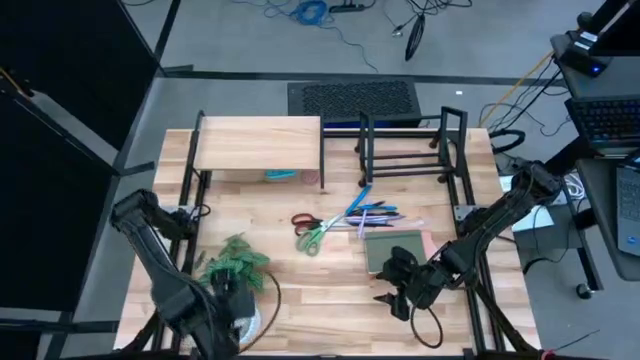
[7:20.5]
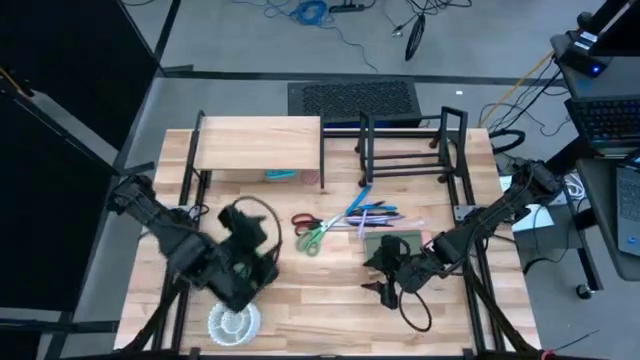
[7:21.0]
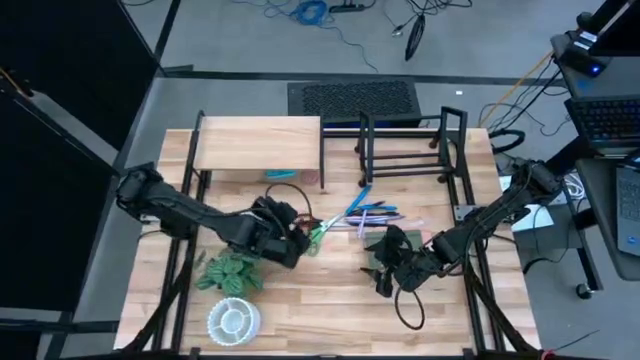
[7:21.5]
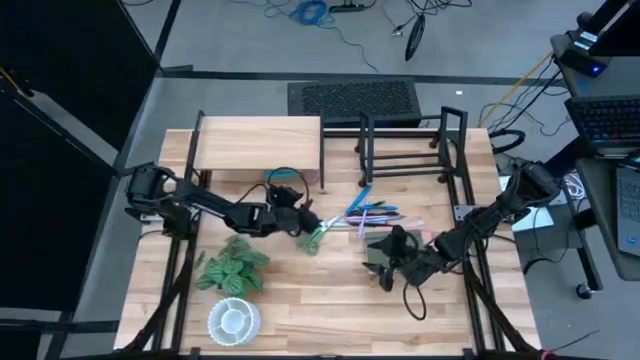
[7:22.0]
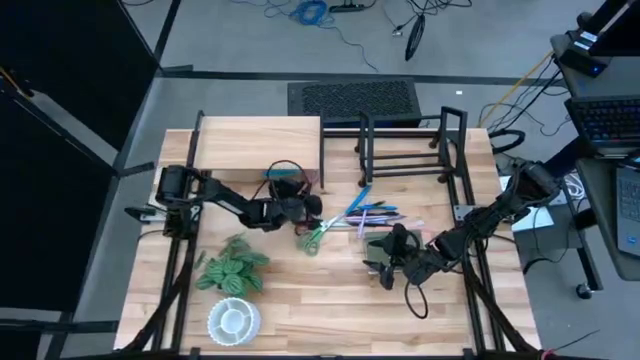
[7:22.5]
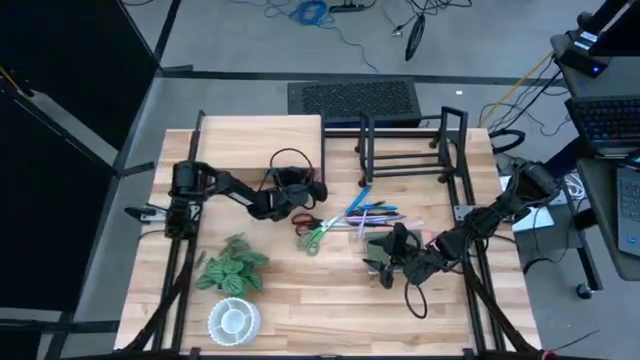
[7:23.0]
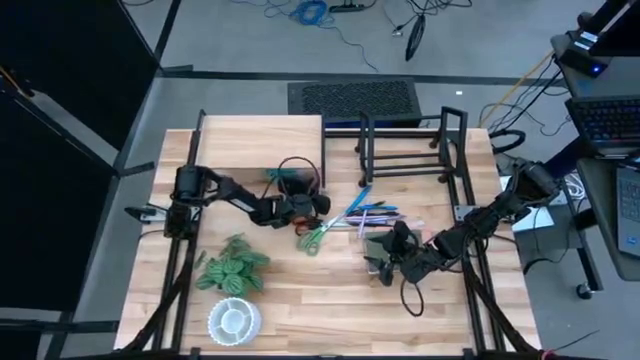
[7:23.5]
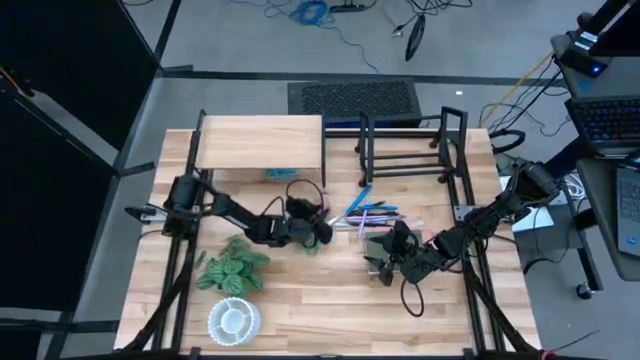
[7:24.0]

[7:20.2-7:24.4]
Task: Stock shelves
Remove the red scented candle from under the shelf

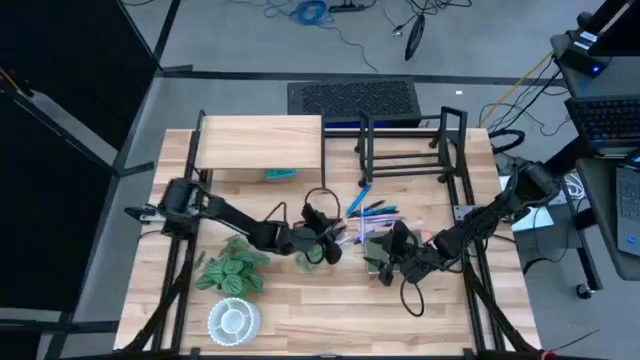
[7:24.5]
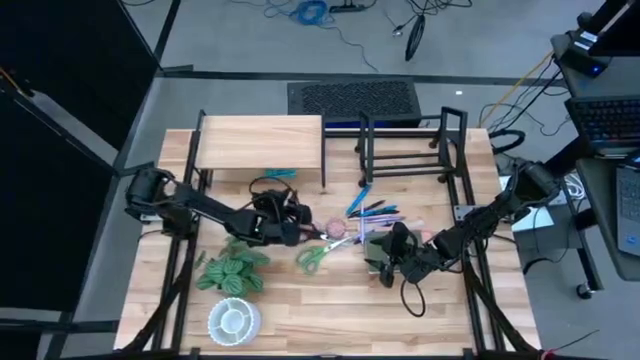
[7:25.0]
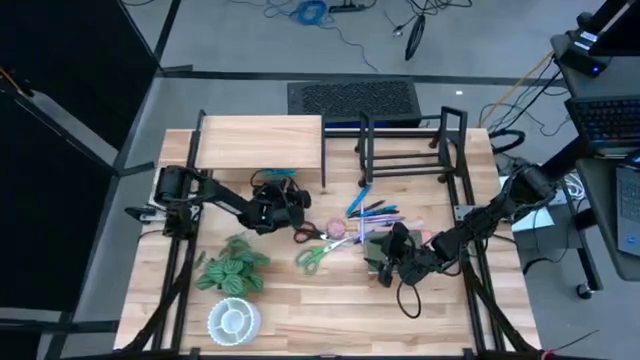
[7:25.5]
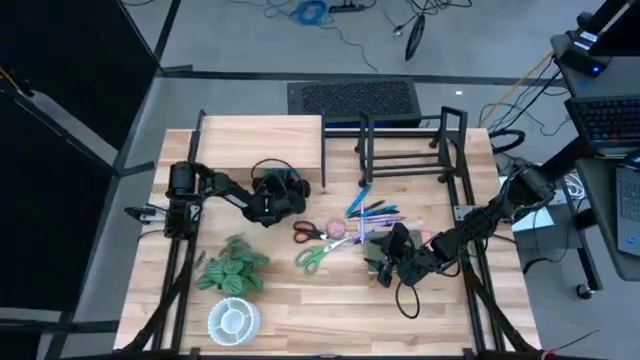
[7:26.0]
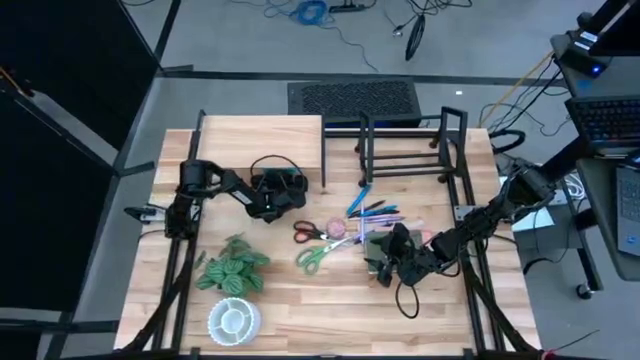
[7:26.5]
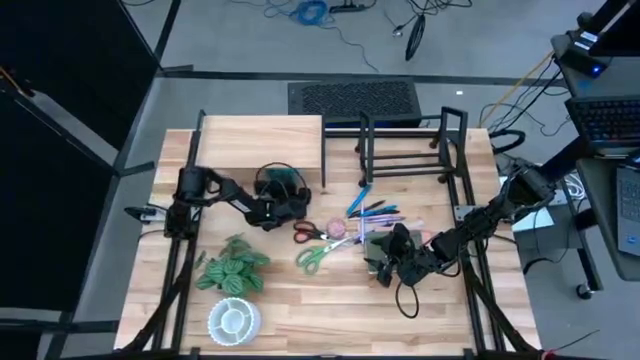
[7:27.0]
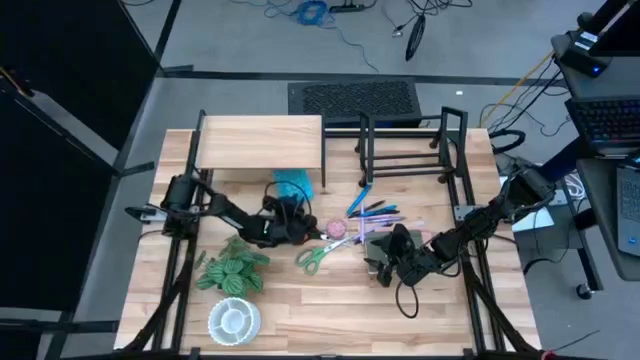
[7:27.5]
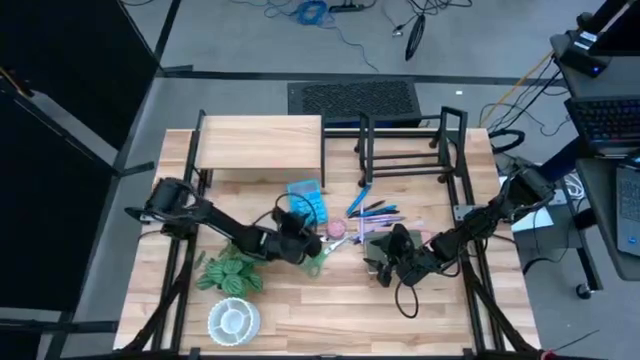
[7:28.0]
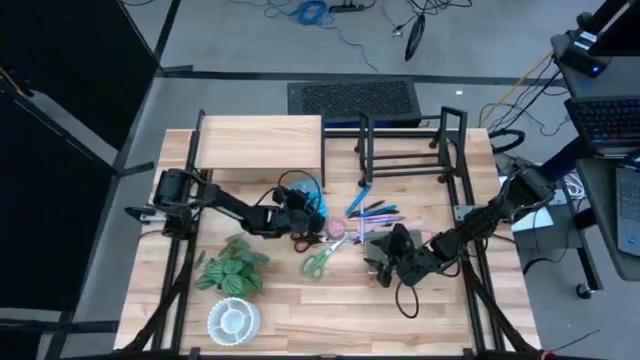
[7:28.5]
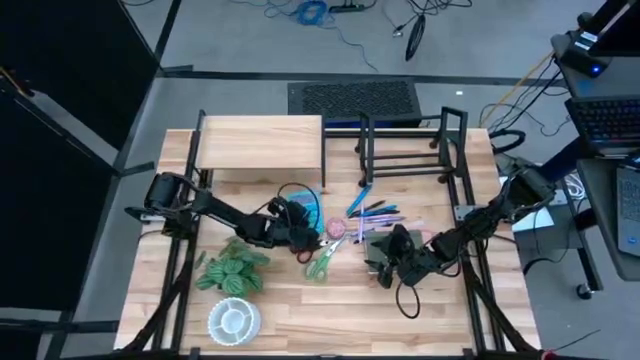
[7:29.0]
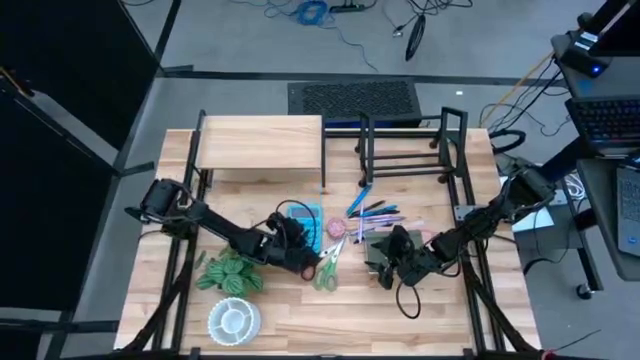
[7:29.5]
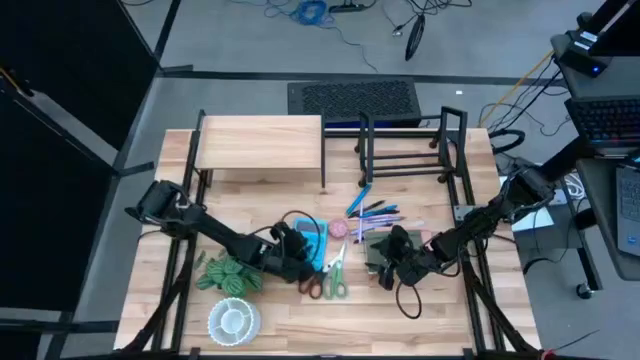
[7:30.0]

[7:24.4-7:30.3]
Remove the calculator from under the shelf

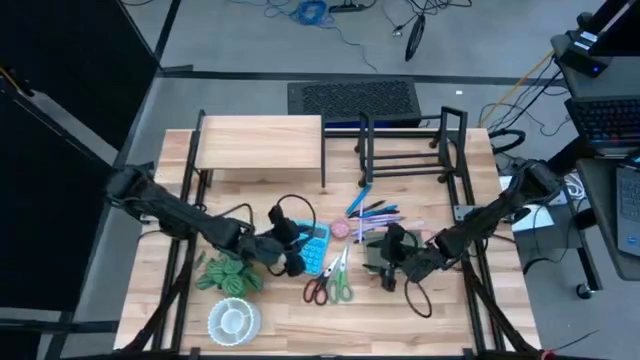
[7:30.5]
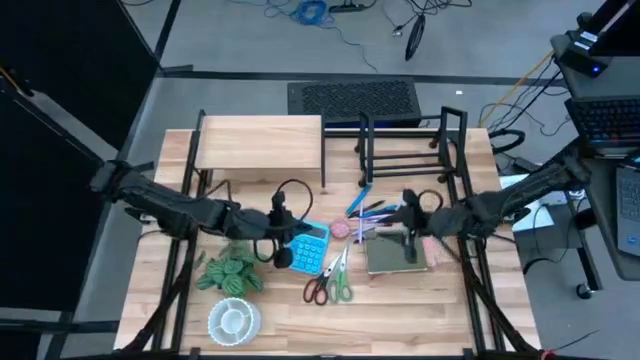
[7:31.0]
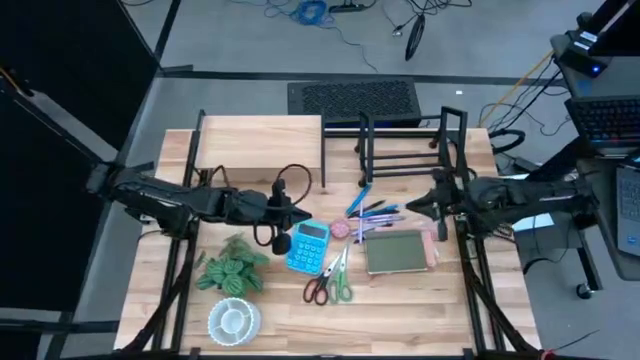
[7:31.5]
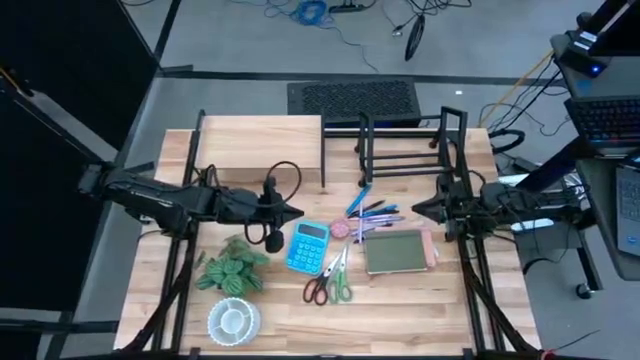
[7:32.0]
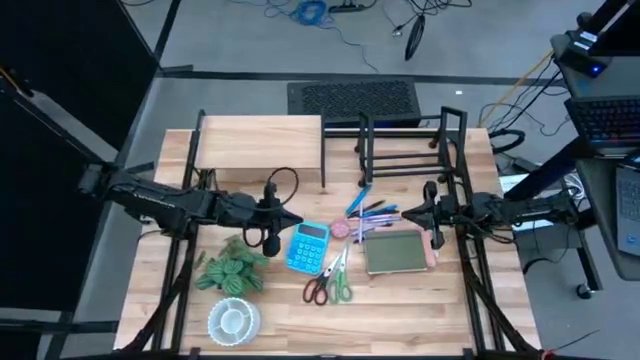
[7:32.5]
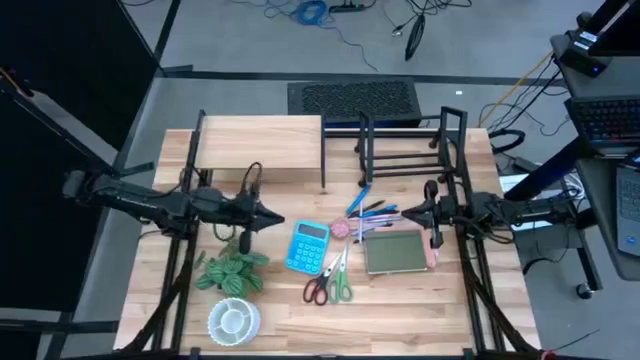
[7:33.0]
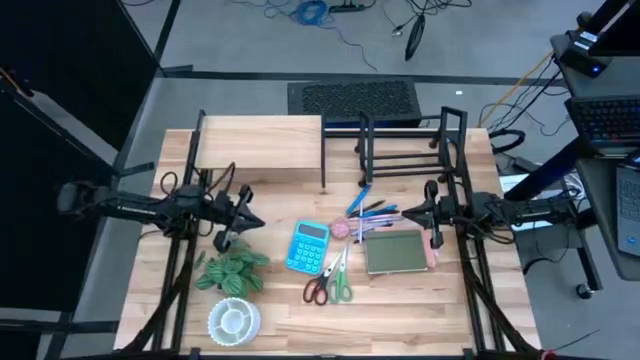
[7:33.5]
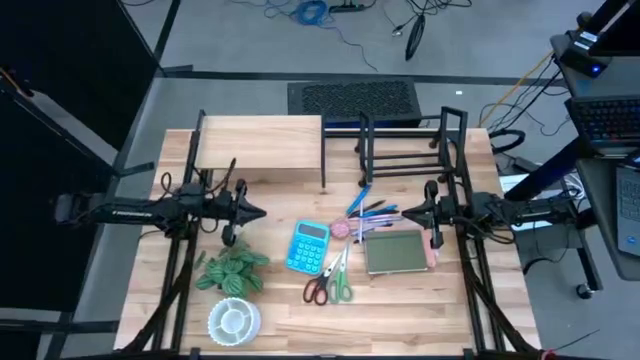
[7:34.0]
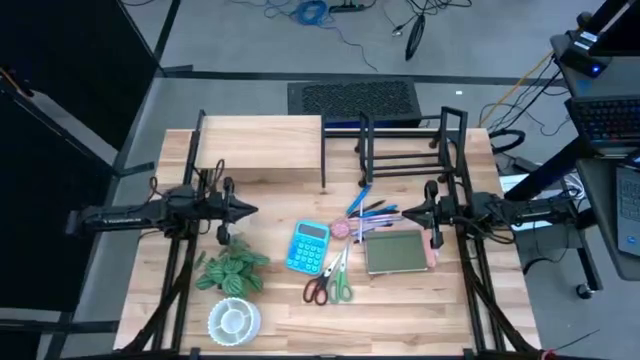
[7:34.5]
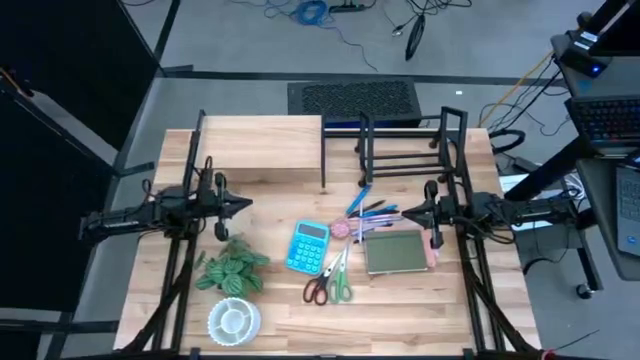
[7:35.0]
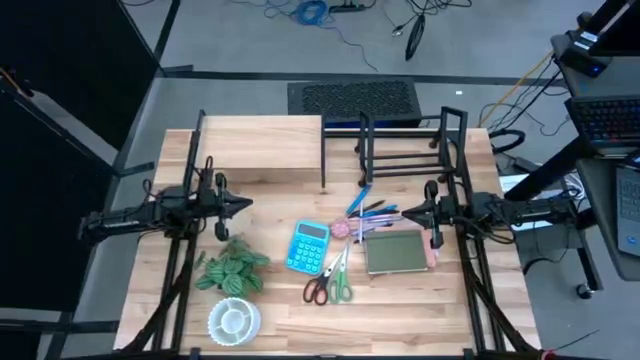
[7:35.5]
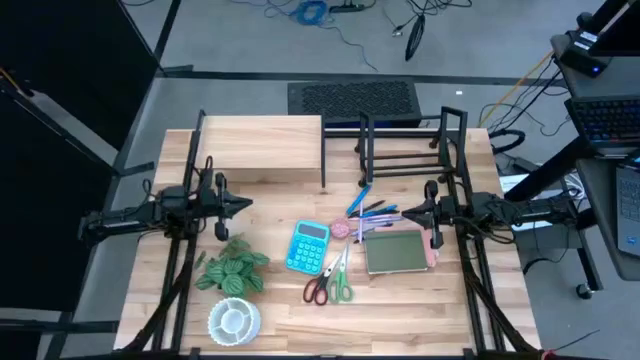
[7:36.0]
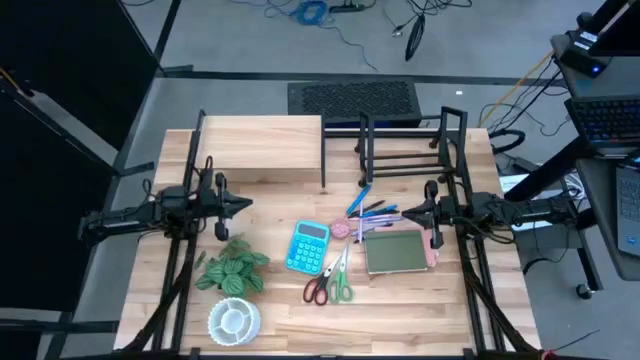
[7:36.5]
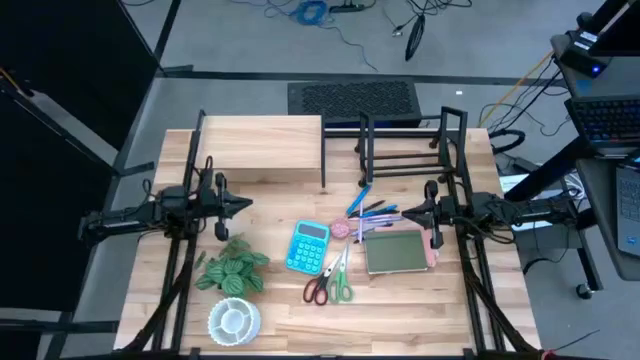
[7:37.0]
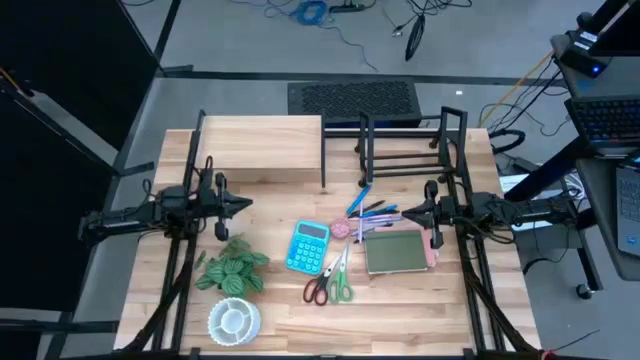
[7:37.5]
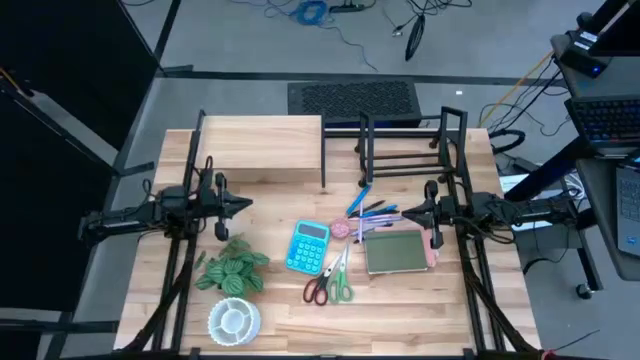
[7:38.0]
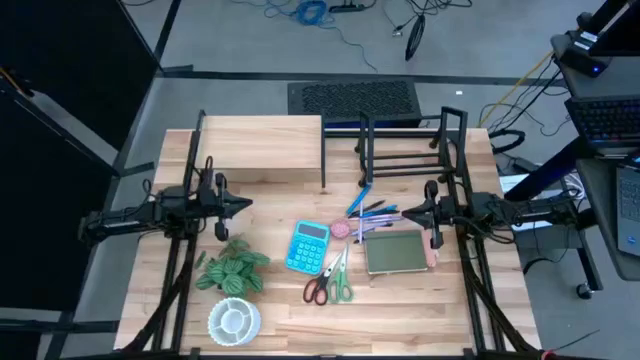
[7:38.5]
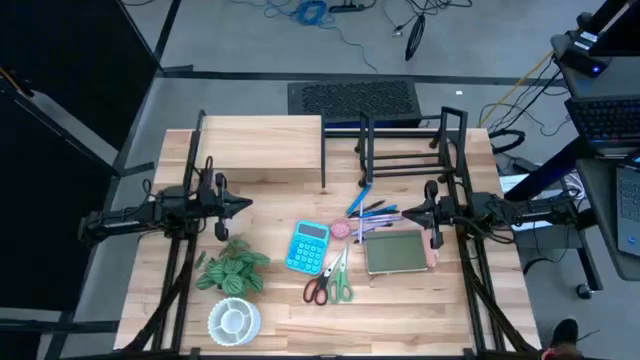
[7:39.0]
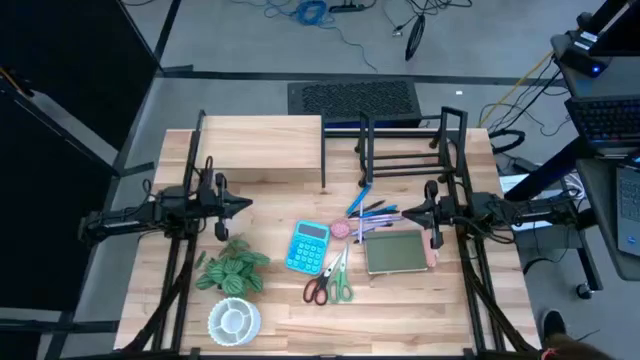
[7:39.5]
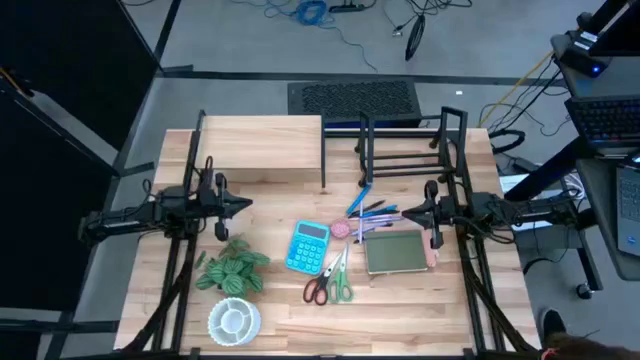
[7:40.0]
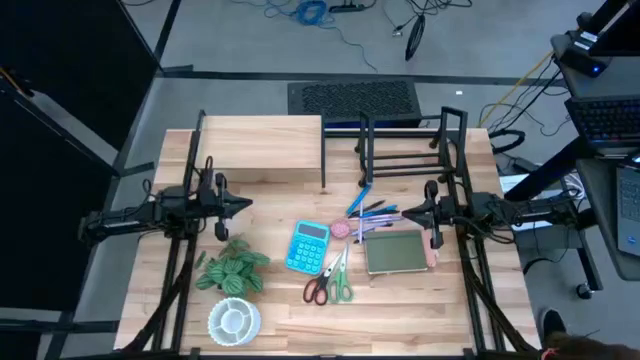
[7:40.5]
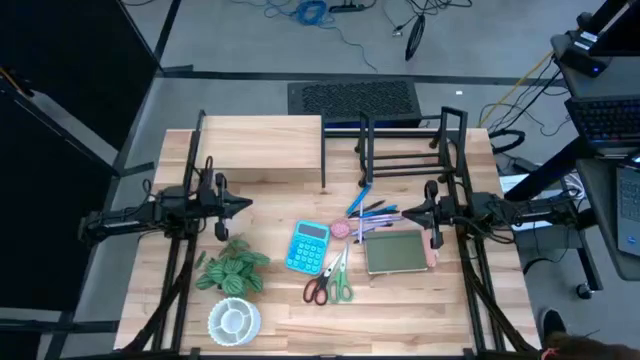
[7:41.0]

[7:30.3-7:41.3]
Return to Home Position
